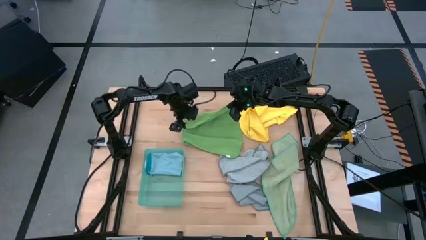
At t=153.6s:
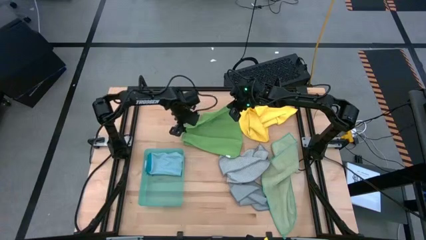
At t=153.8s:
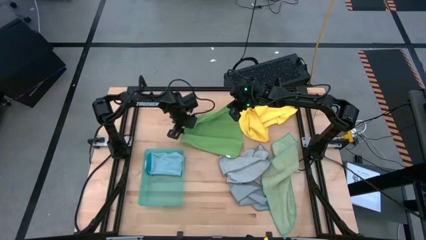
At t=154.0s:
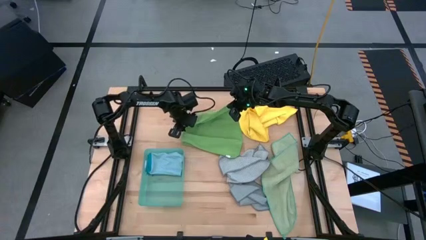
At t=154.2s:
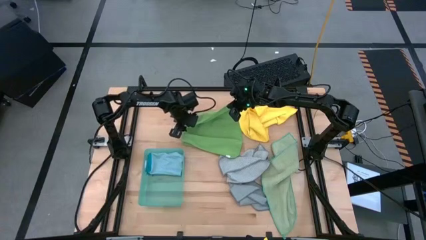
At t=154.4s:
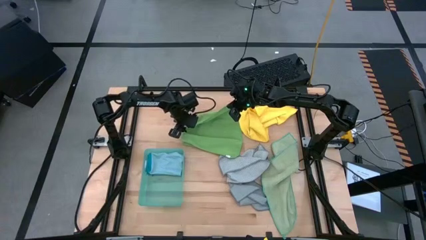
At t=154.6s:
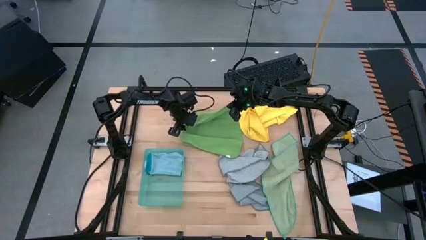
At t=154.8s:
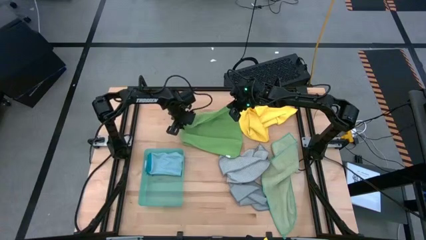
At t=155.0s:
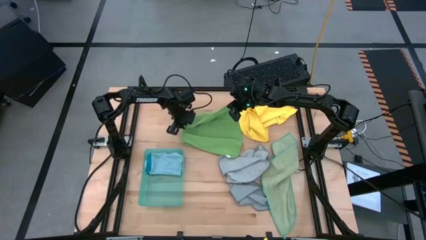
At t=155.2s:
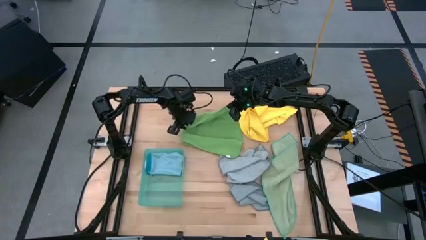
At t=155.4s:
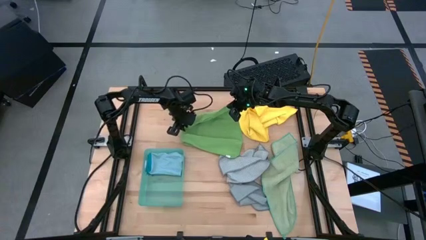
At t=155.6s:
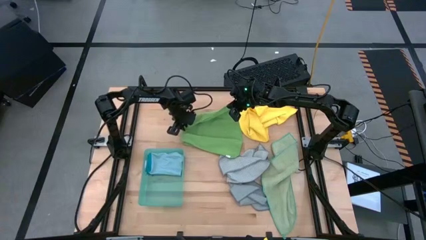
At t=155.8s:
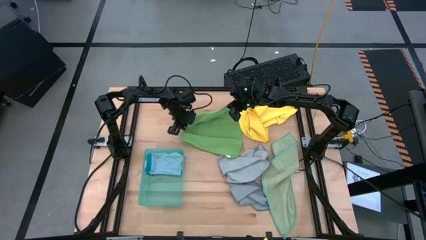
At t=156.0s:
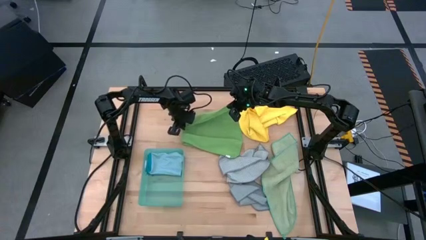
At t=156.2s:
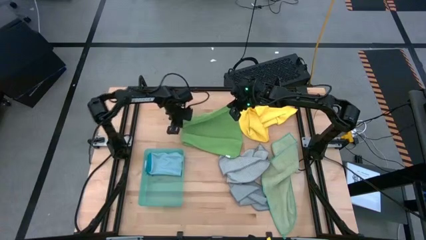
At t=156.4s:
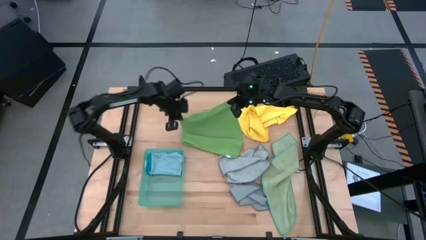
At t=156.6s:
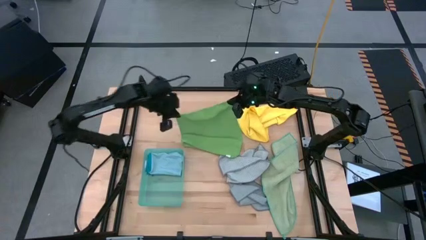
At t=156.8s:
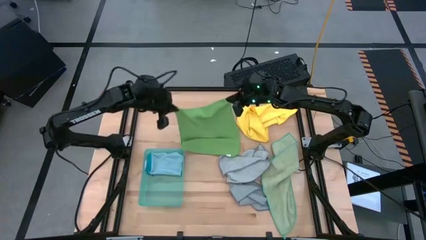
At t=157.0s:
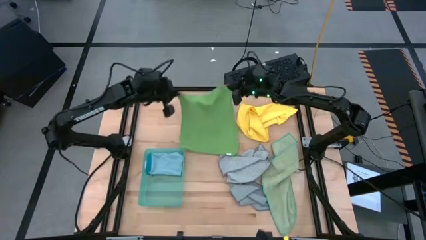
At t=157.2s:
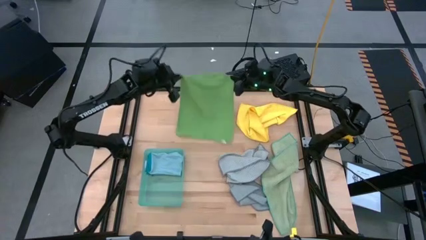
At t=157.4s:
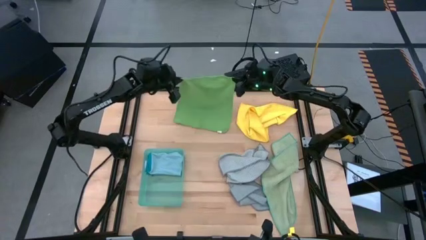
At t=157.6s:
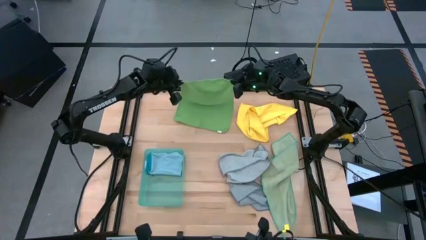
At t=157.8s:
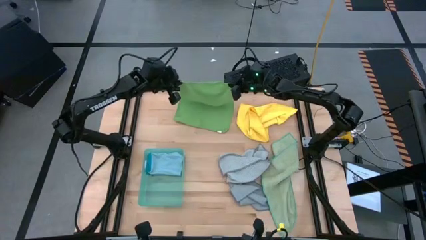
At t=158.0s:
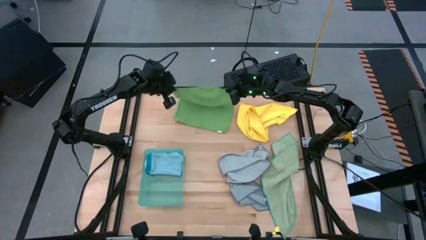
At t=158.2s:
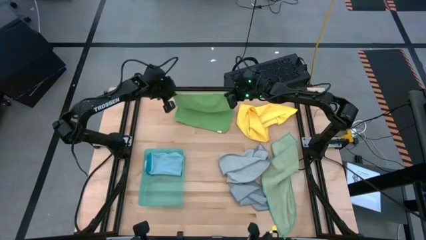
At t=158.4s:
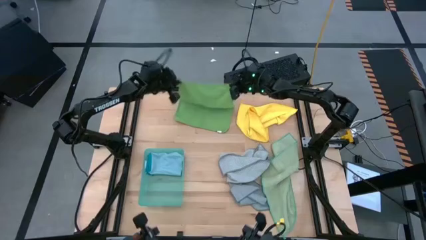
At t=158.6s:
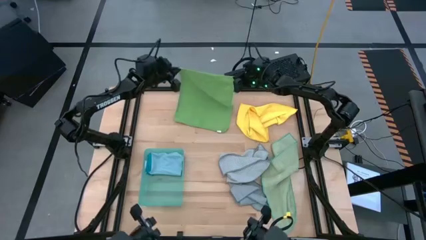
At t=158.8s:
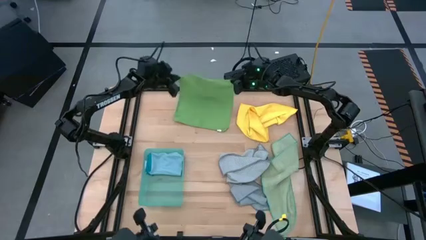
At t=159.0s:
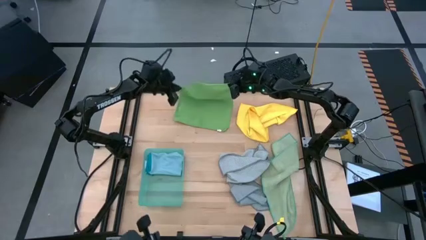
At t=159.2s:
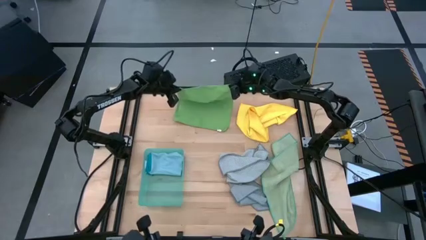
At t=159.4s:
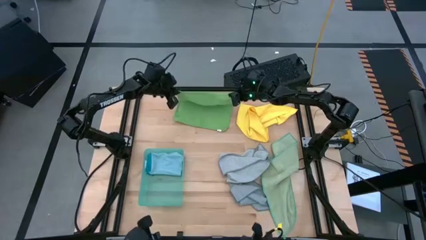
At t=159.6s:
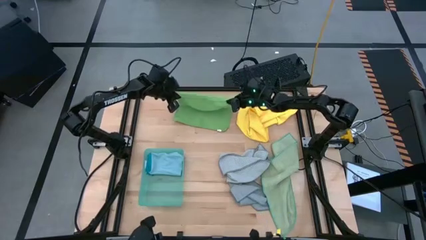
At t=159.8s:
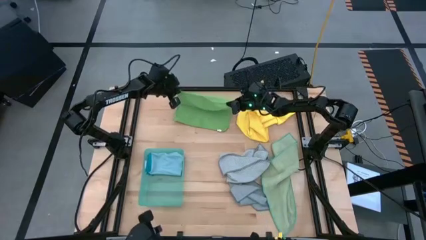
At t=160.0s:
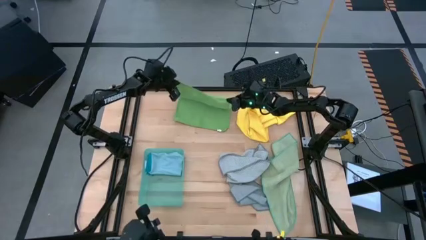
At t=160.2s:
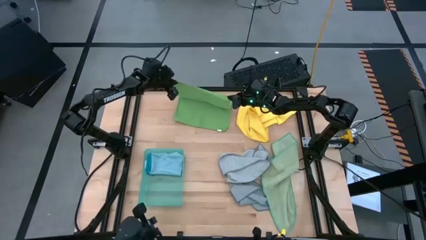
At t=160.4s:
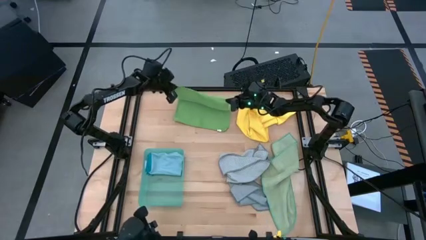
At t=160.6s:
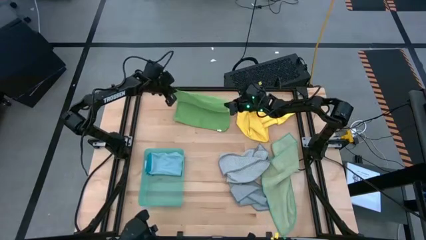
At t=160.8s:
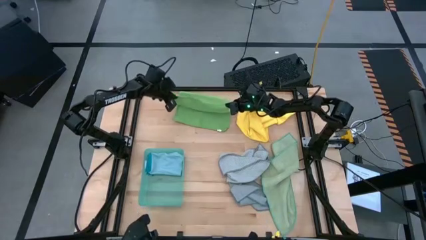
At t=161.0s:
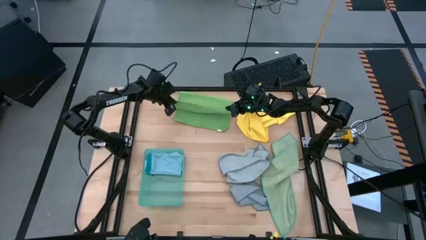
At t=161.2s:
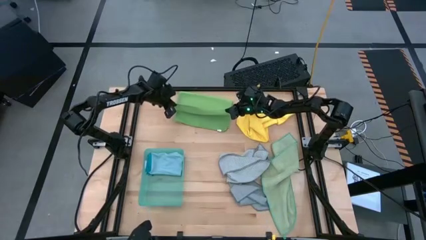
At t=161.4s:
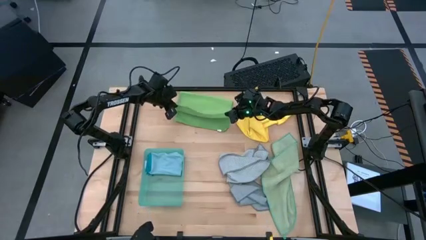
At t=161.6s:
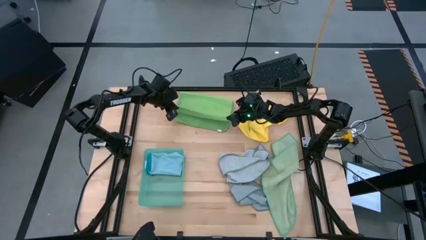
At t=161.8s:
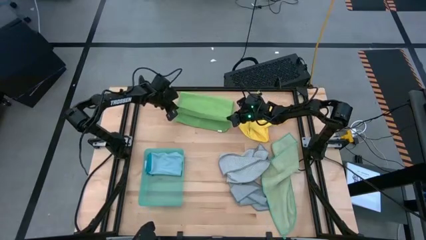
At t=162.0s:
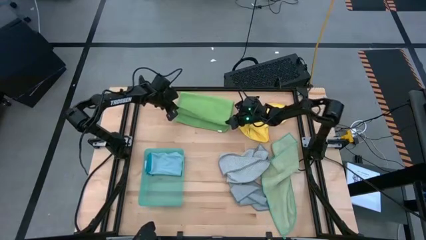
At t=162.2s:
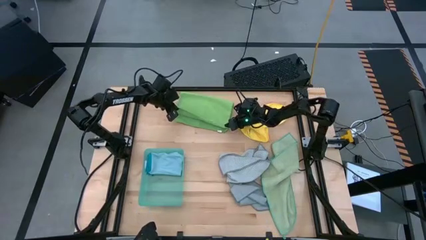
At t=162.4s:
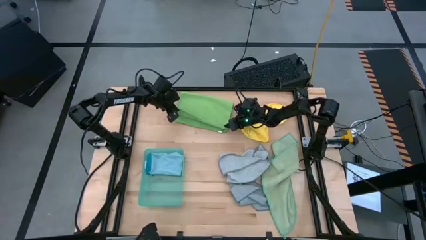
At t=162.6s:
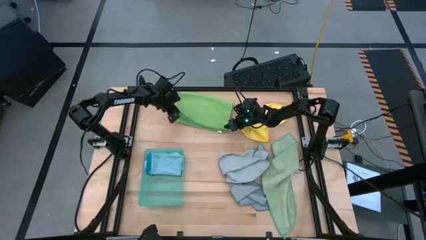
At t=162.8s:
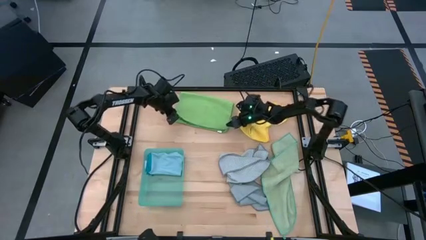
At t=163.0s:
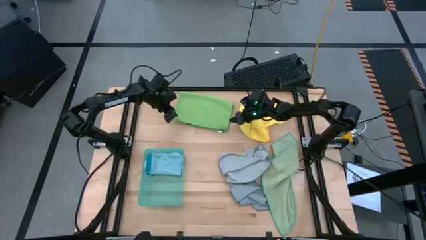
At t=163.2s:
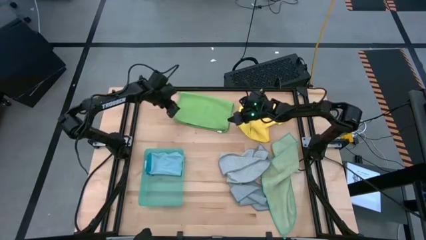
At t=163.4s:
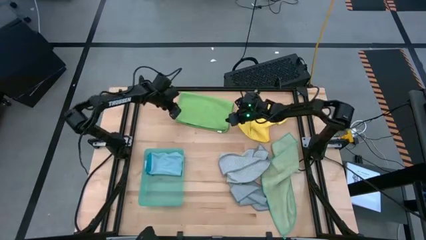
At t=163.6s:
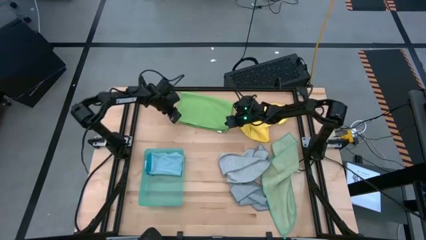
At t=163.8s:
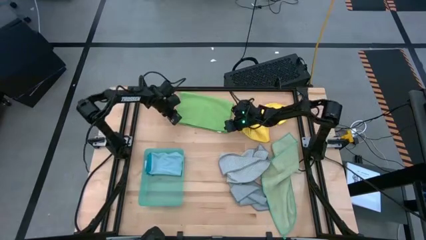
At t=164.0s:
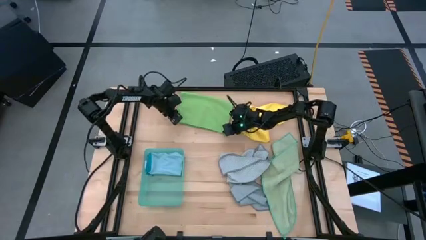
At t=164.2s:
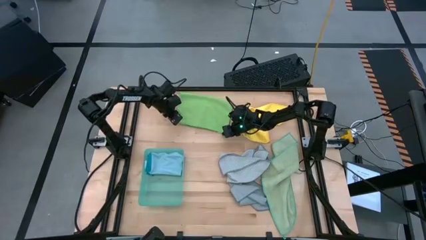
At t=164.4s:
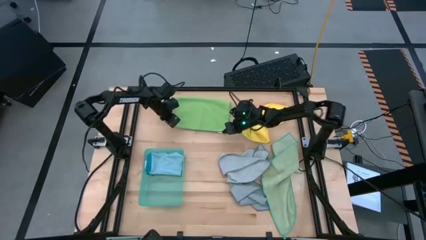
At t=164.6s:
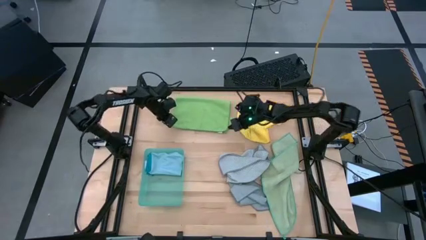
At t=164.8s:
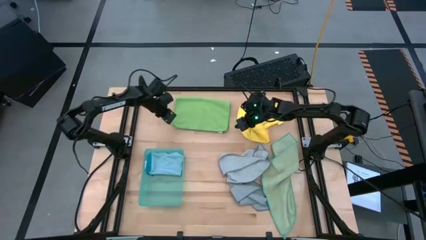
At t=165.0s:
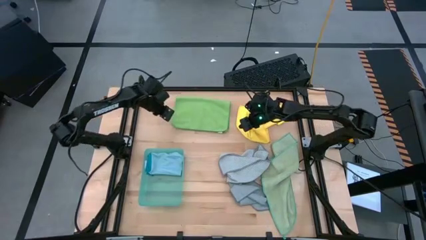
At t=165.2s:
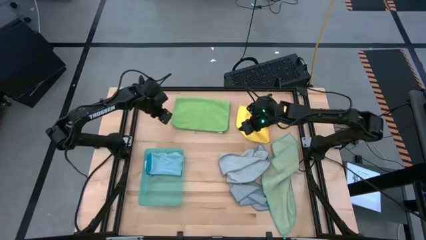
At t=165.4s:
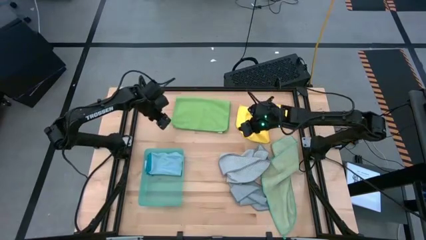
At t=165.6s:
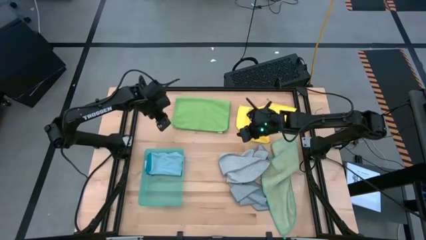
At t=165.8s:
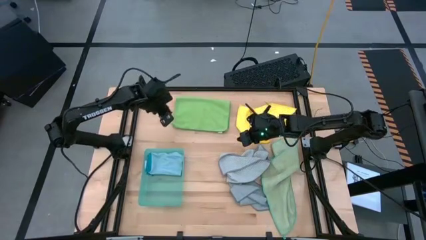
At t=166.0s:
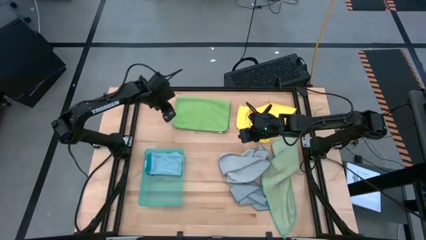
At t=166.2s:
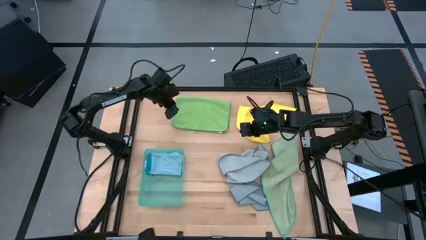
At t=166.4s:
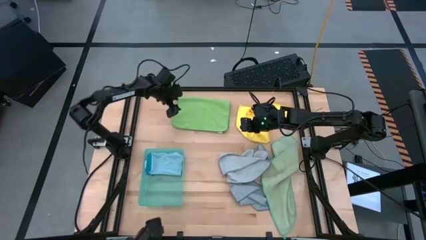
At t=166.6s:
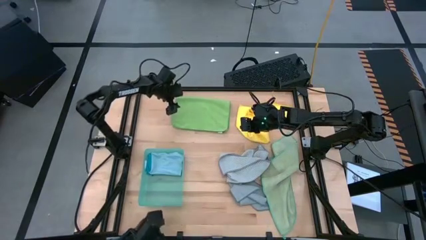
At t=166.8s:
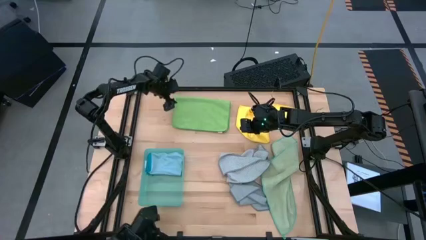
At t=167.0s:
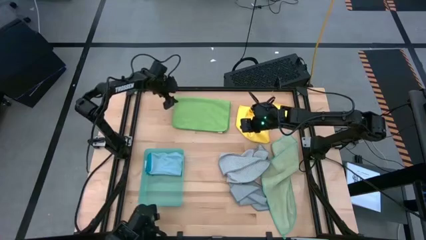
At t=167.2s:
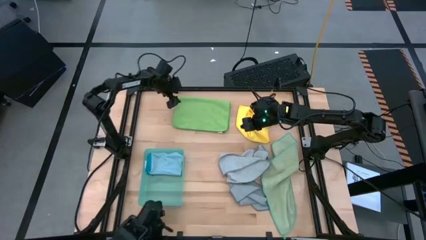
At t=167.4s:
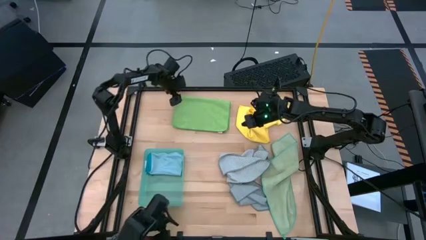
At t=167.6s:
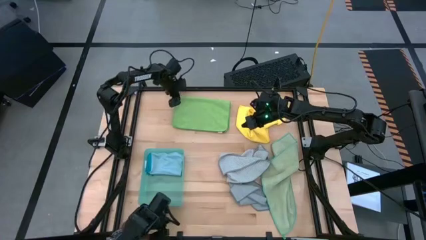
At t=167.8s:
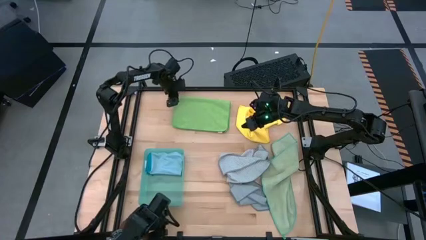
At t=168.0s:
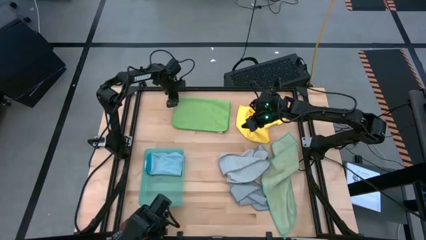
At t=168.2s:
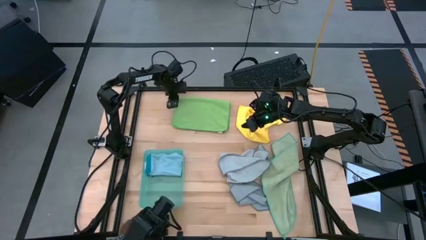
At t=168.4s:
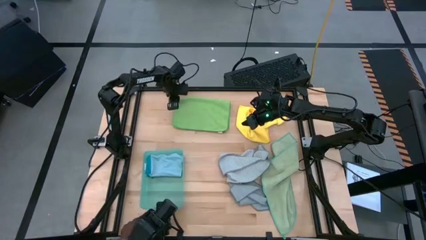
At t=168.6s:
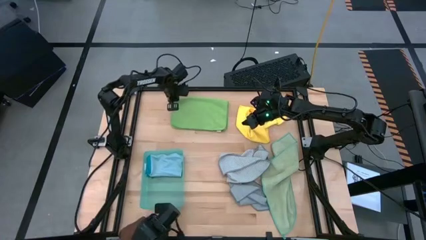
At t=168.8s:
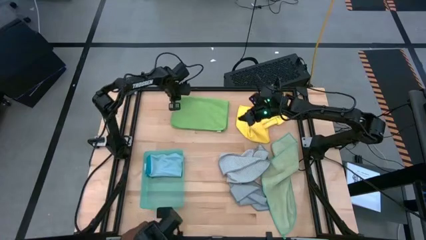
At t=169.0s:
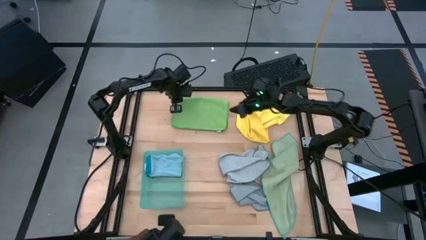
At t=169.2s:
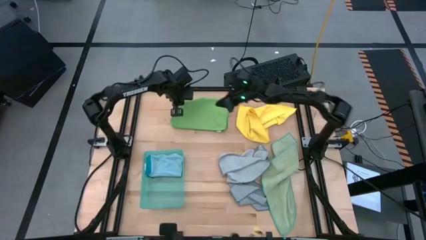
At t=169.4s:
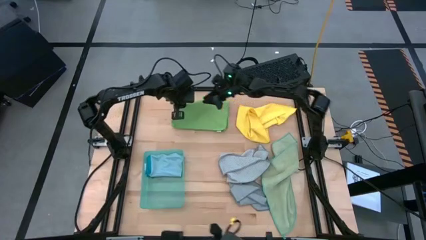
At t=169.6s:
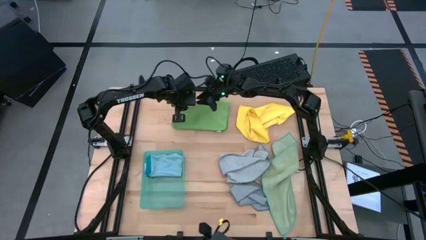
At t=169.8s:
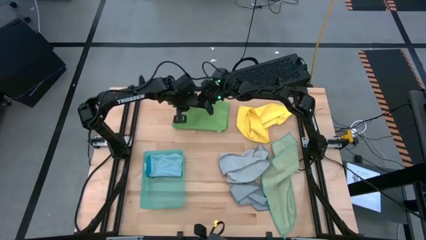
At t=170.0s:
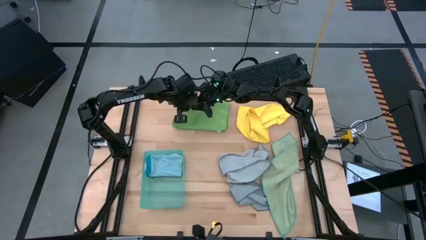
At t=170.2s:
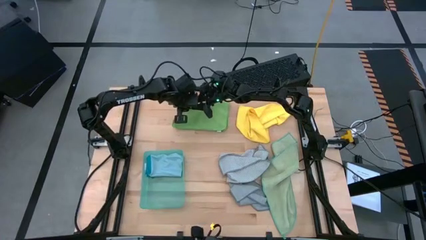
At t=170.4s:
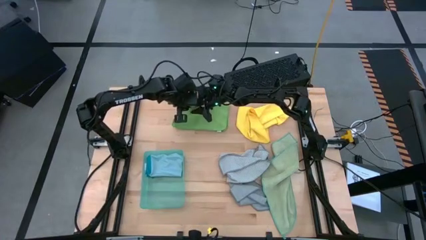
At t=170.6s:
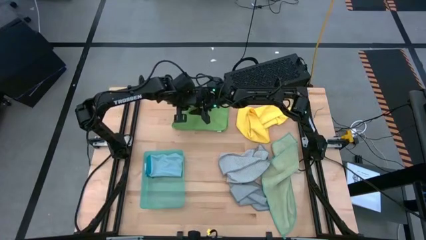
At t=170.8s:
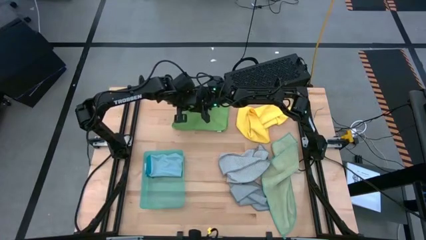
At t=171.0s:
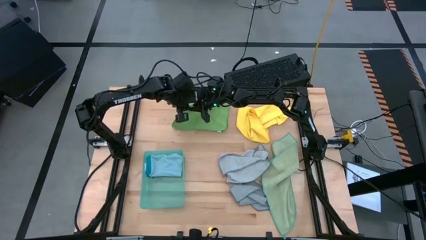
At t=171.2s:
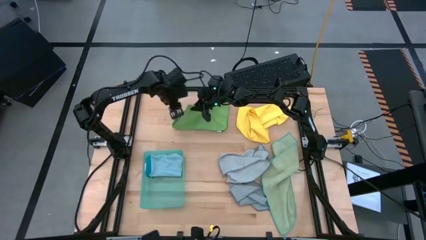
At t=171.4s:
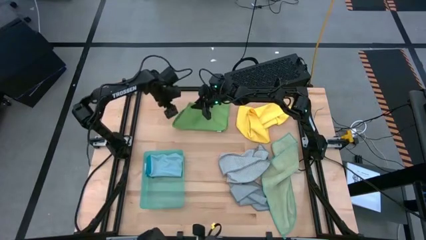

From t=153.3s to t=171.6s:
Task: Fold microfiber towels
Fold the green microfiber cloth
